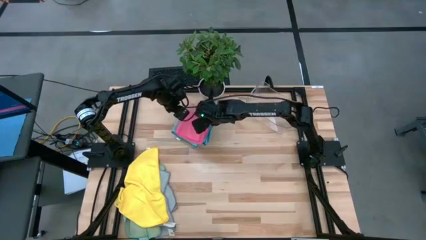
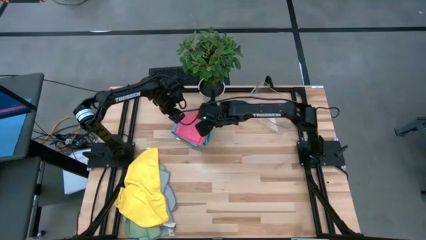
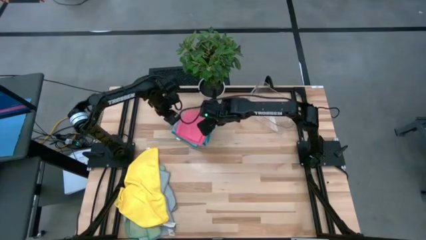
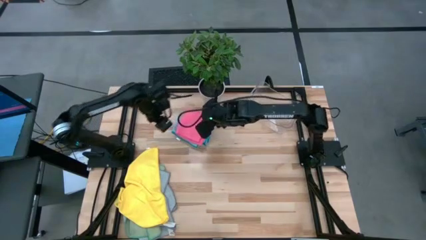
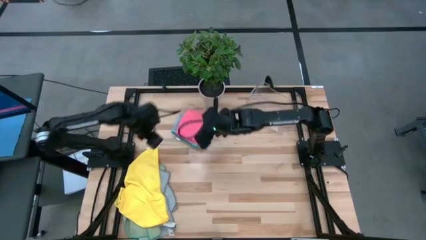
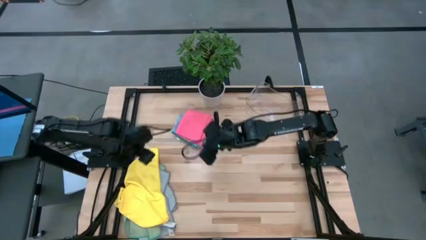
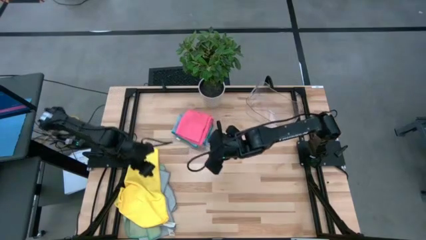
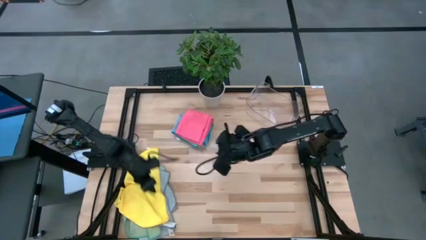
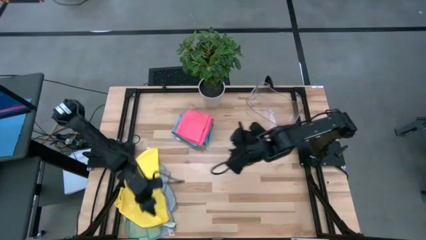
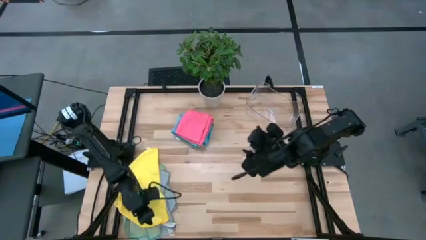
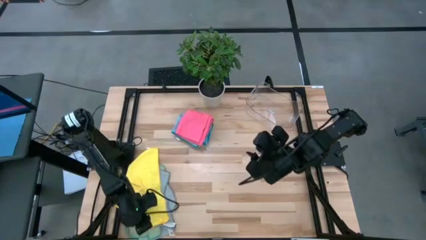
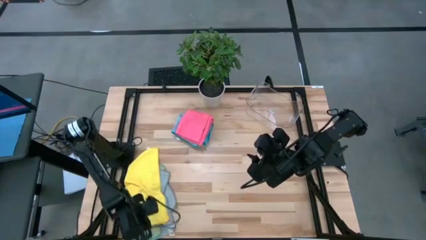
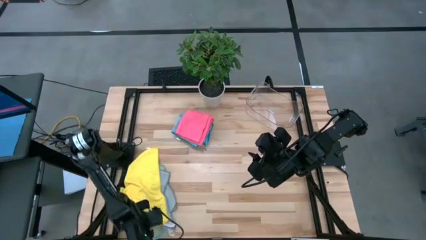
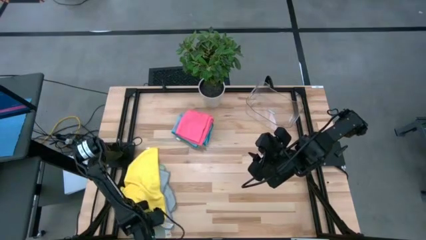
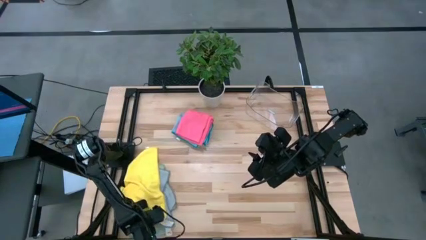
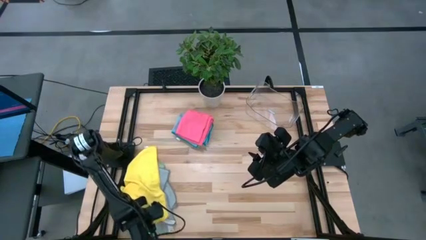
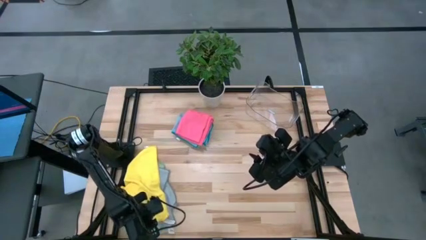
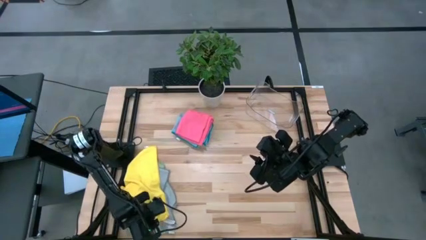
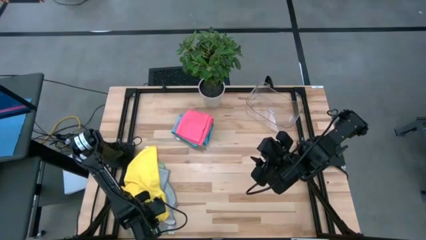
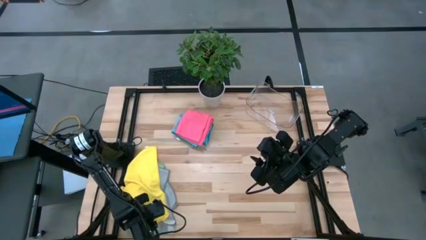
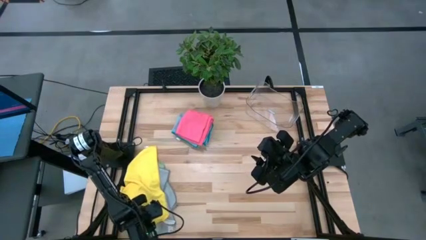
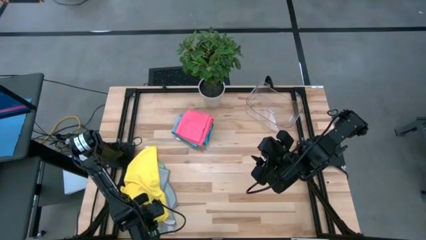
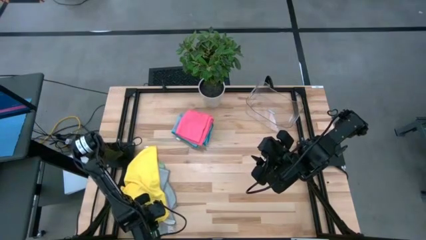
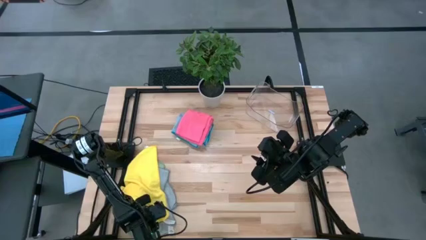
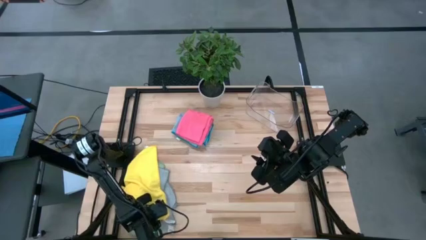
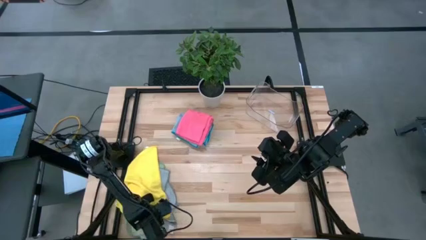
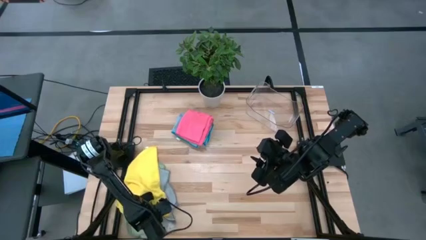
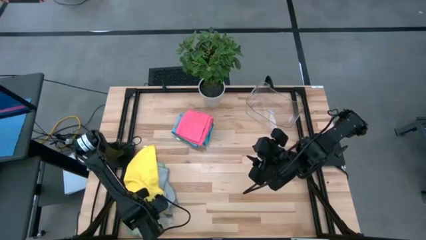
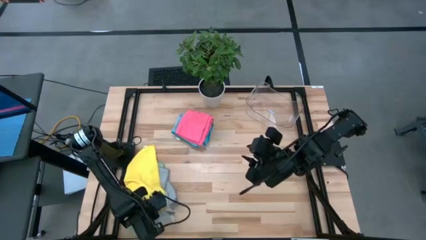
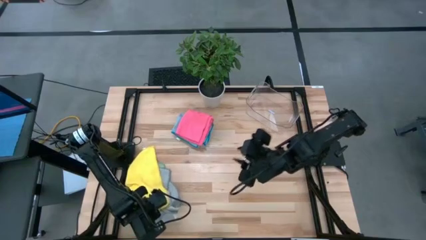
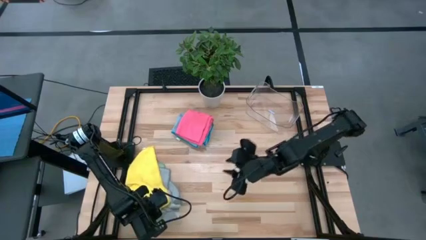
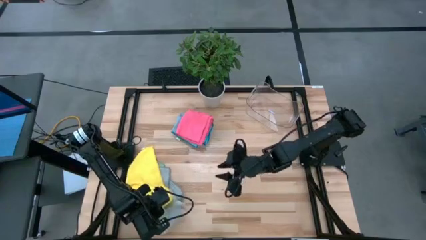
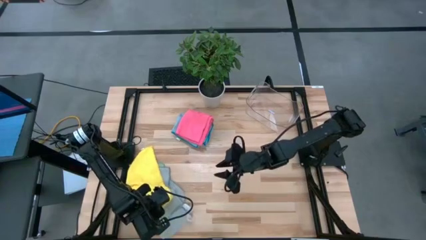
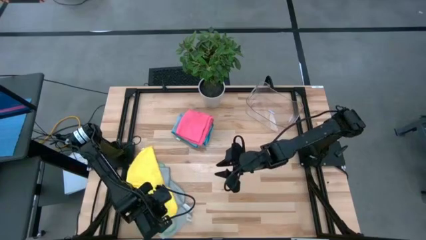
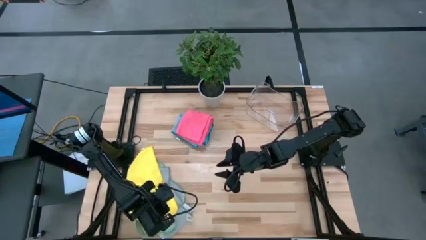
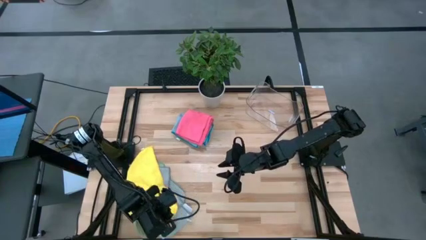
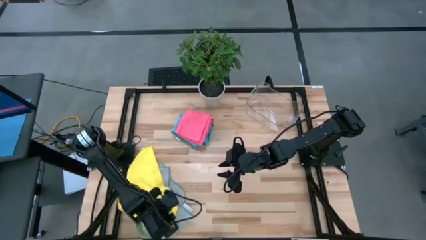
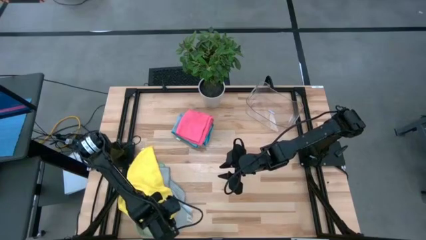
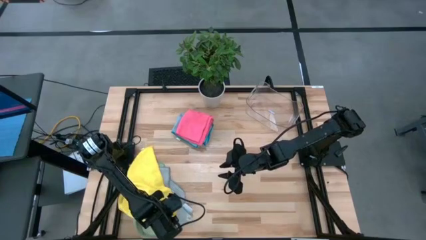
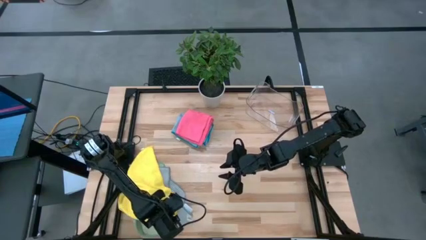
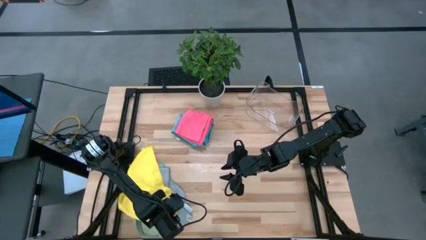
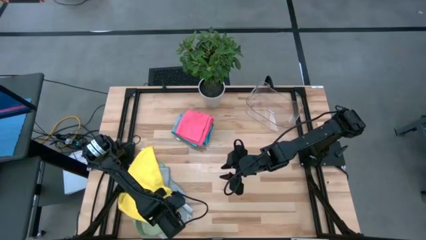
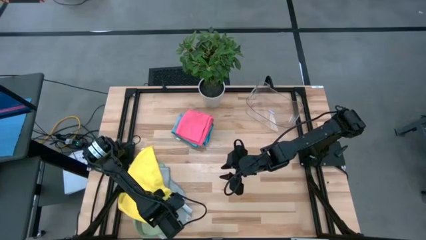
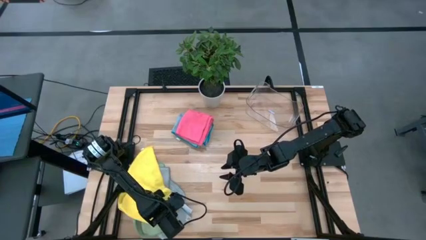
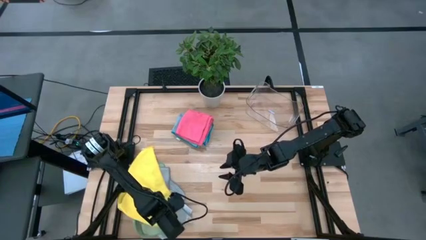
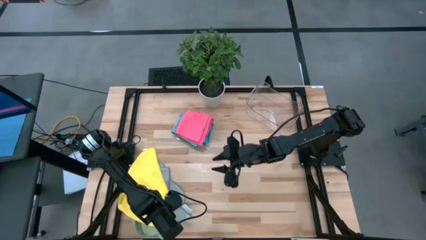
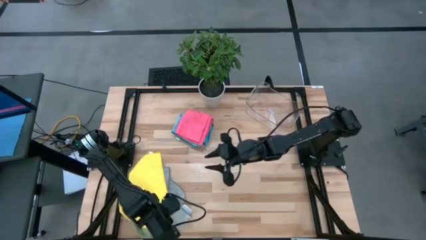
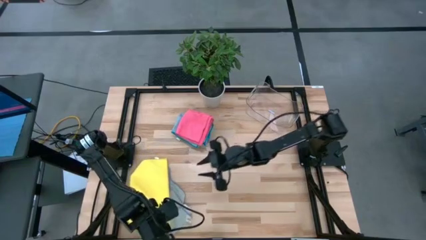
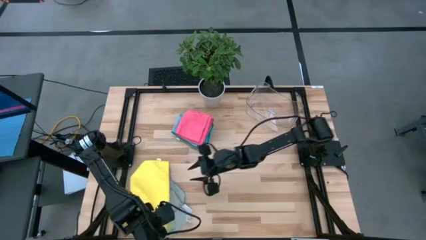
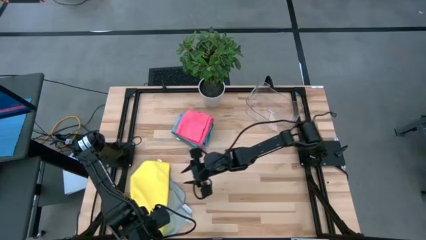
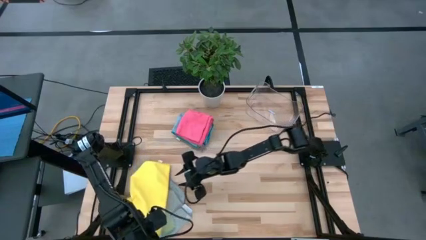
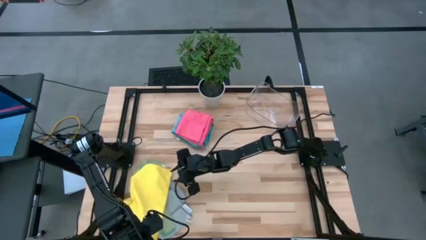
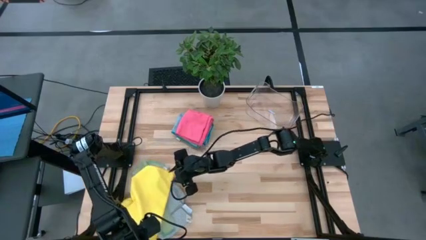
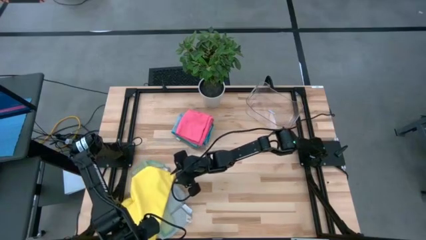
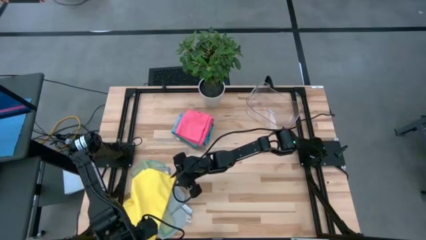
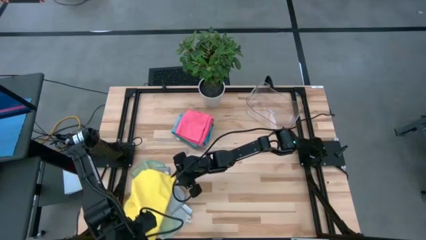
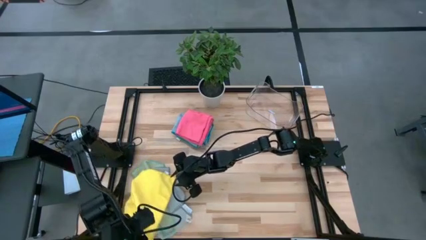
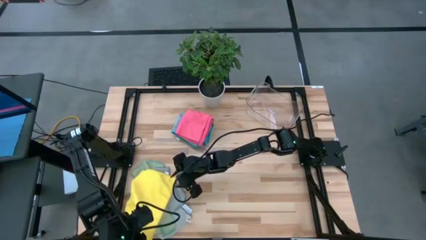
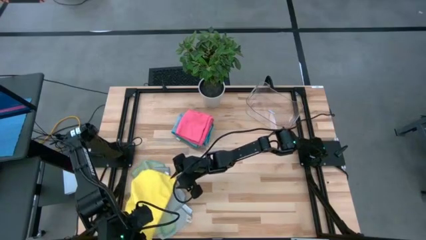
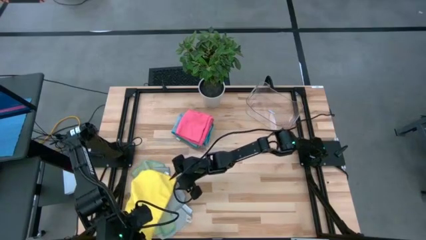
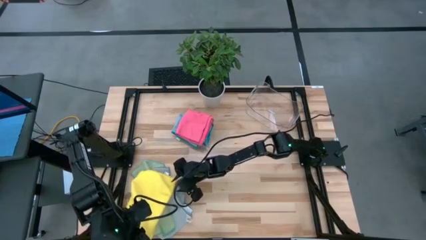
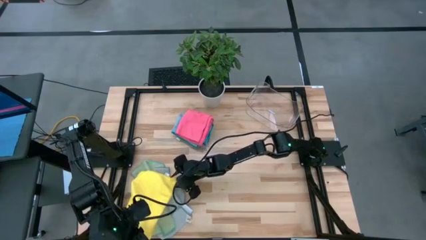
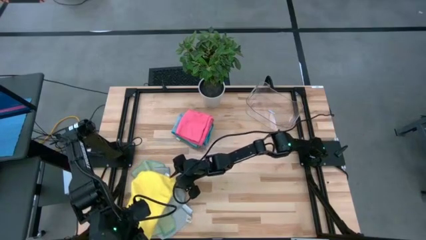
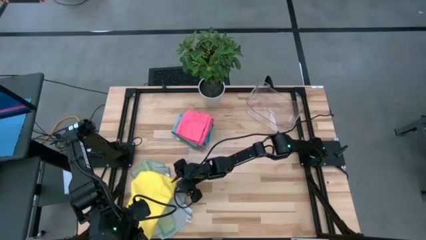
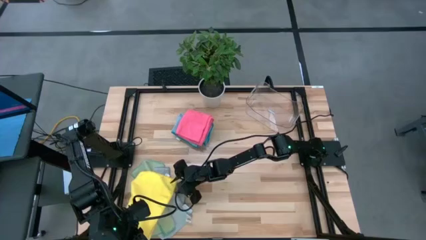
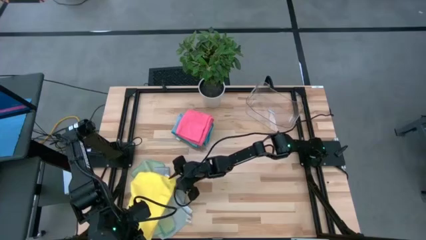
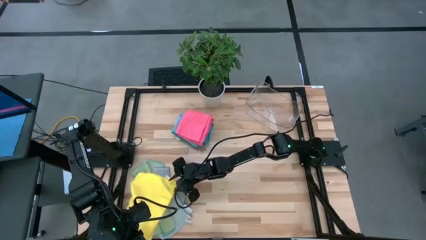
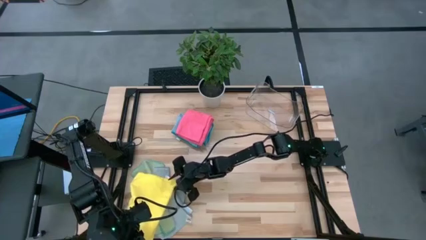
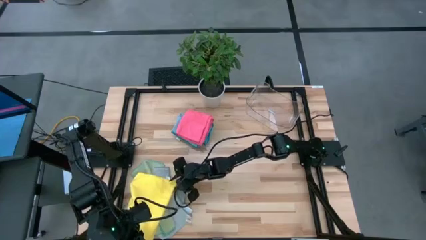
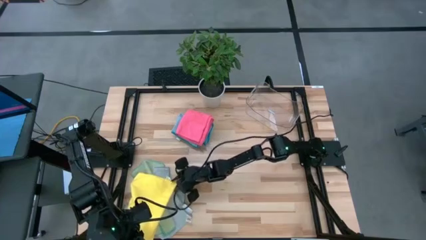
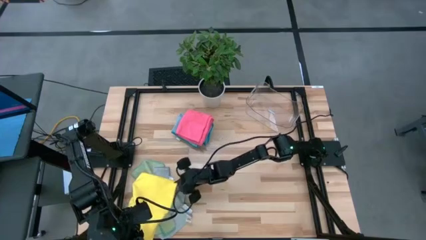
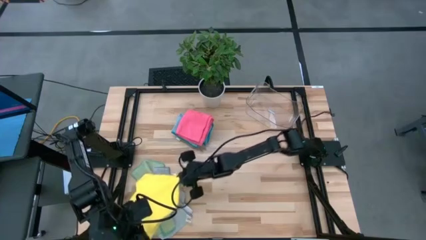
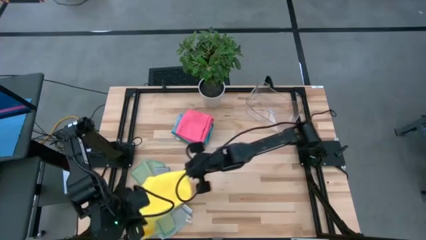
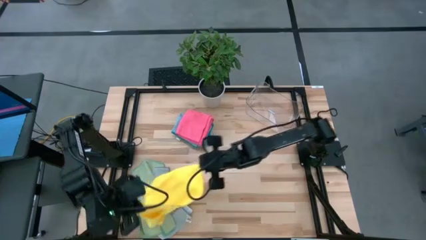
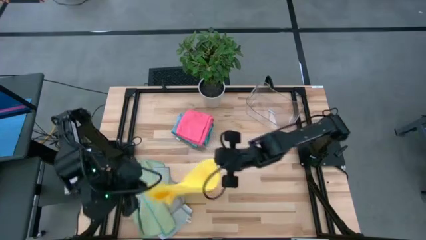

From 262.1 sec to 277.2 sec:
Task: Fold microfiber towels
Fold the yellow microfiber towel

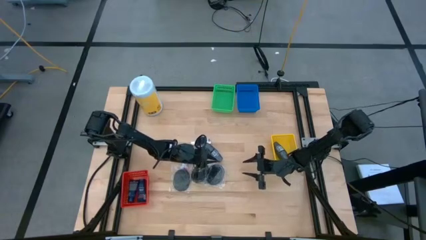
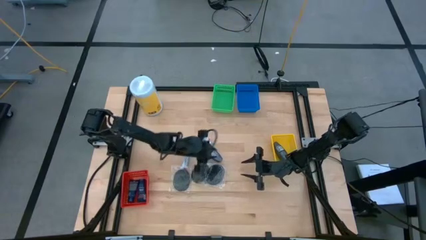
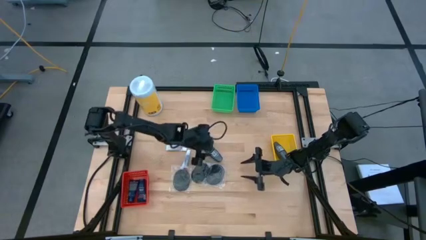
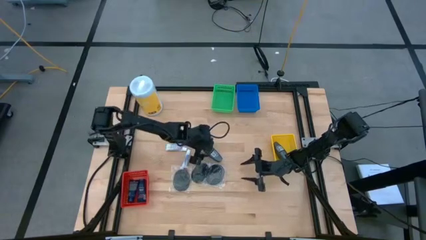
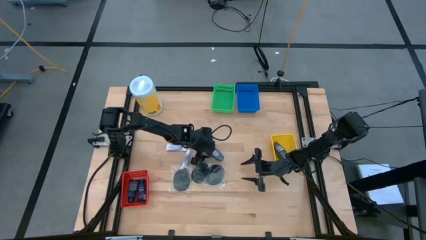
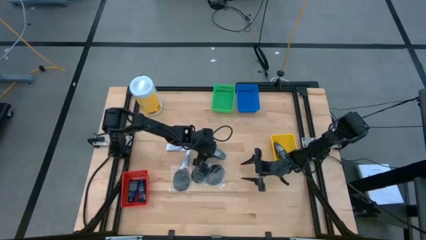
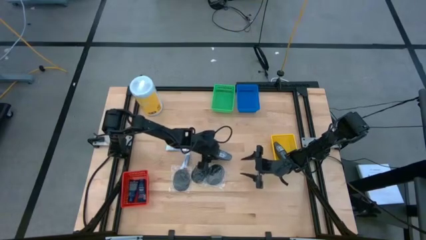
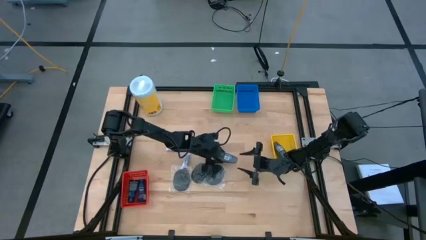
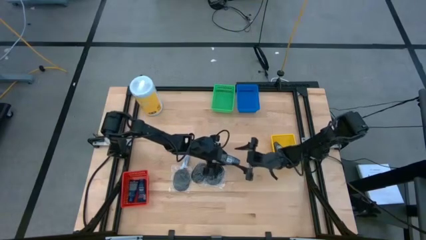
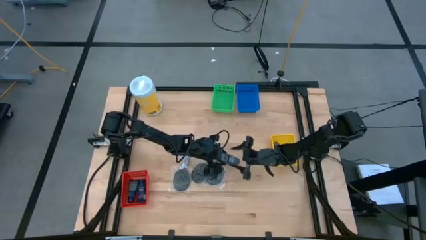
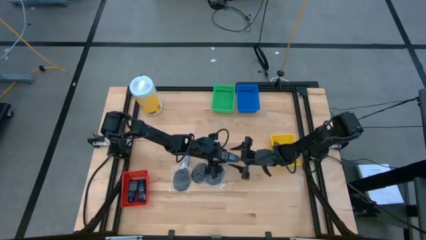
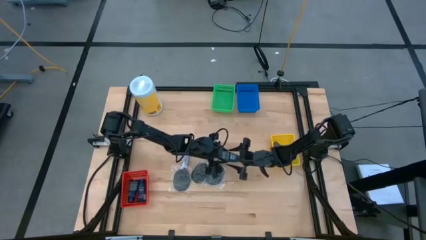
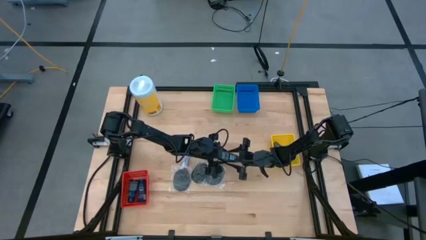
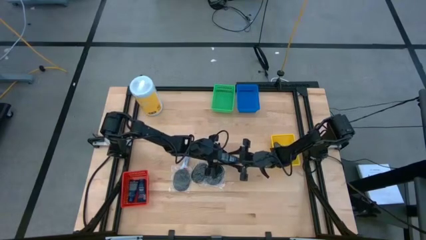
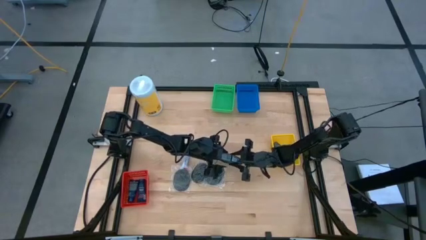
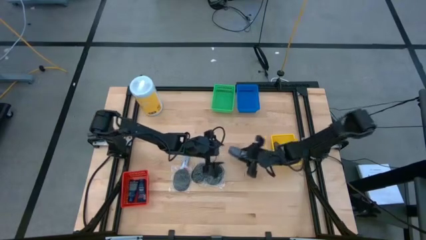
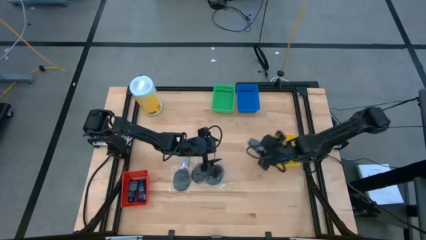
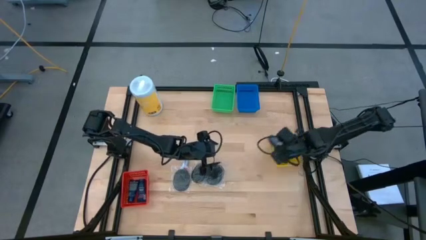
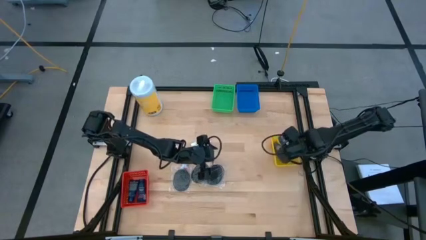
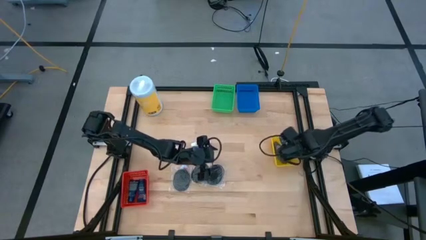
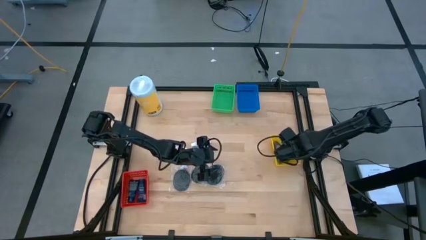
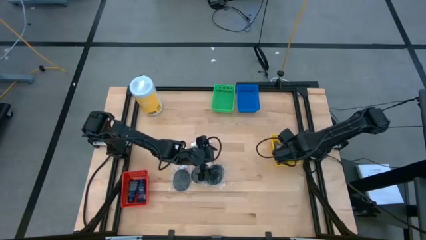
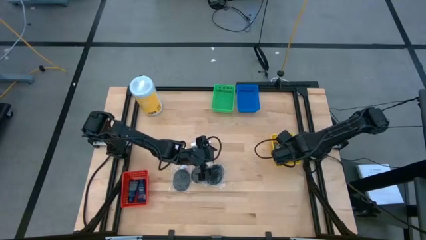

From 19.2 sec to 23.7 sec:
Task: Pick & Place Travel size toiletries
Put the gray deodorant into the yellow basket
